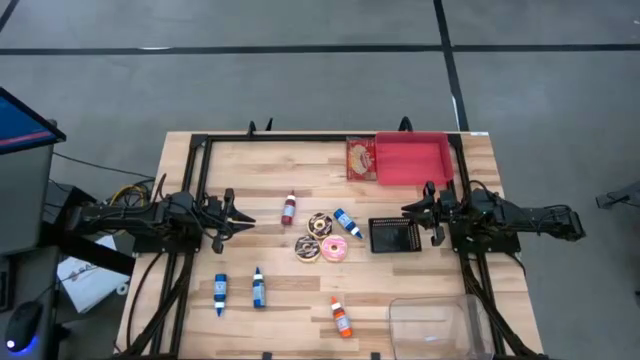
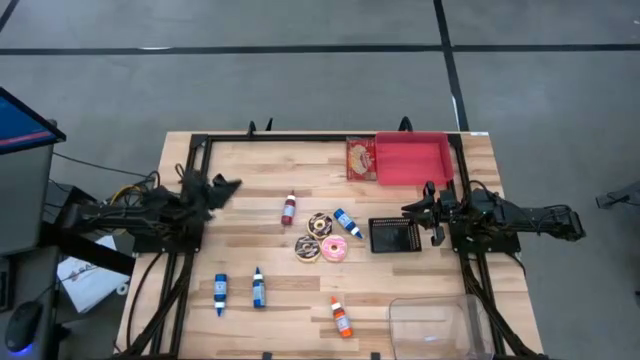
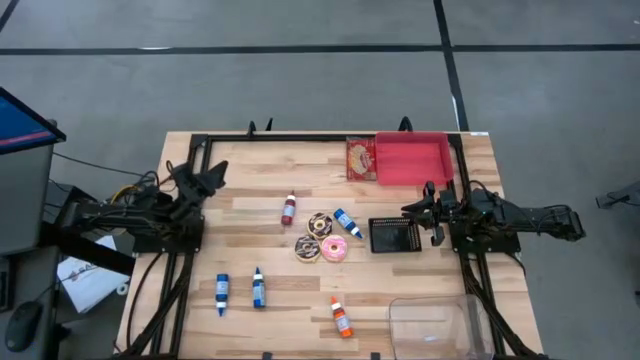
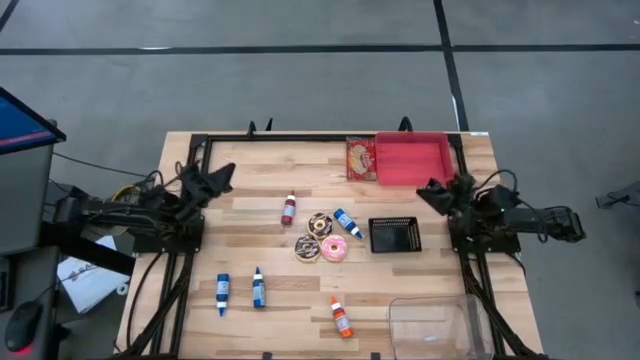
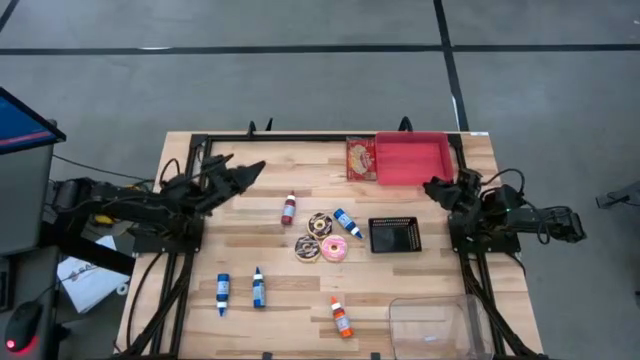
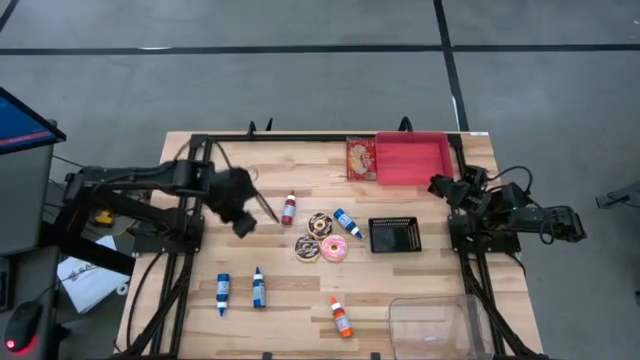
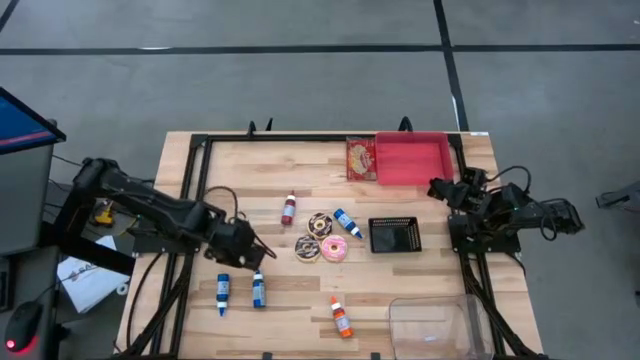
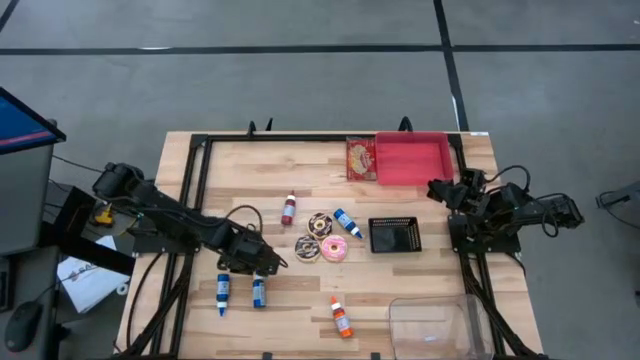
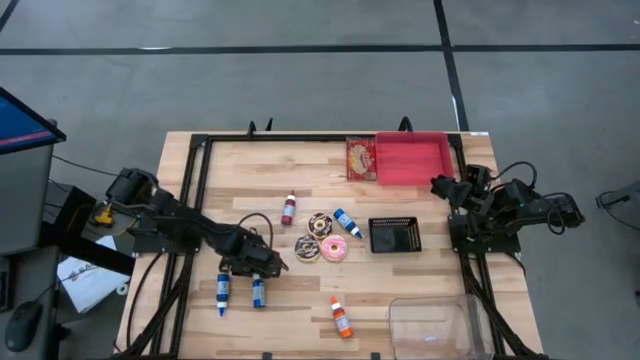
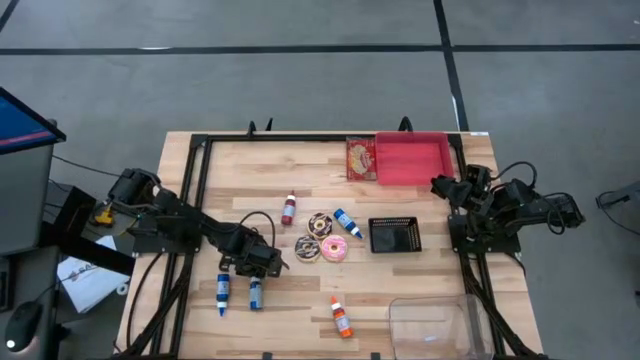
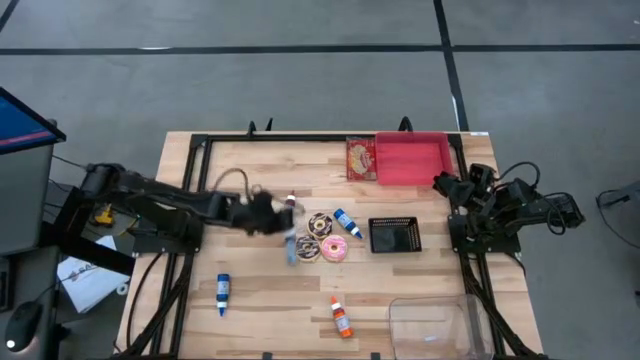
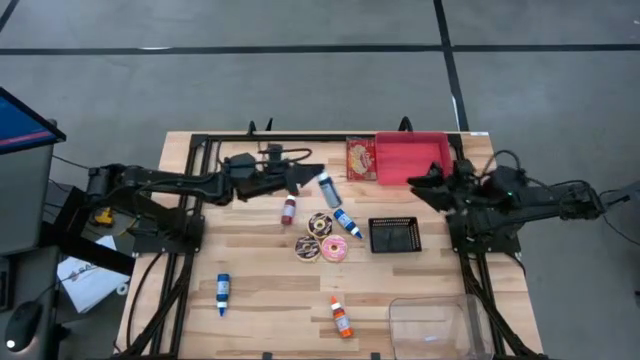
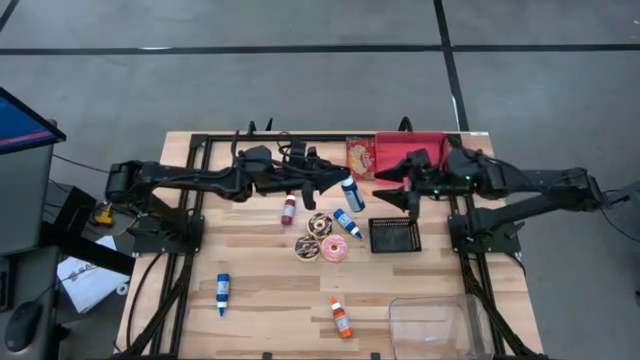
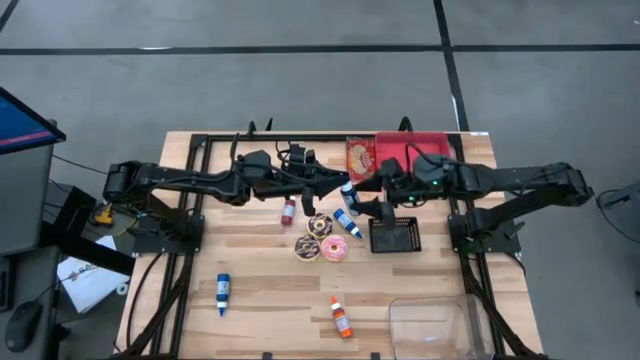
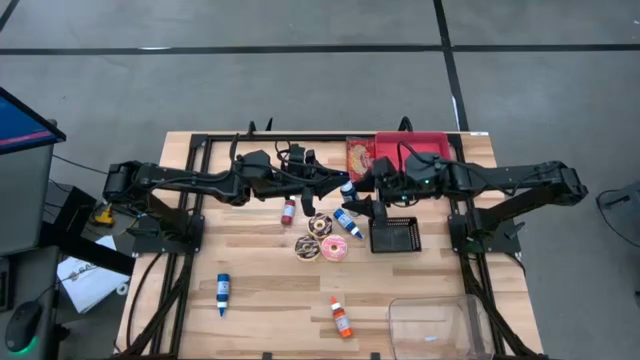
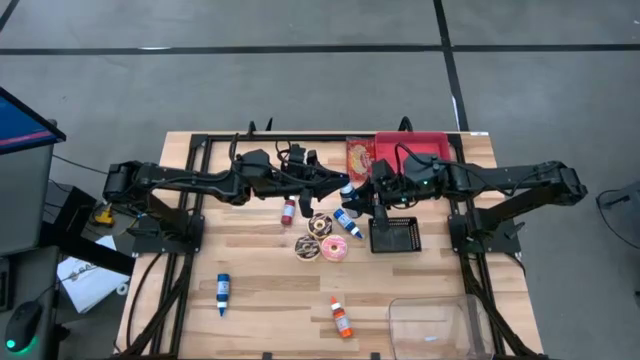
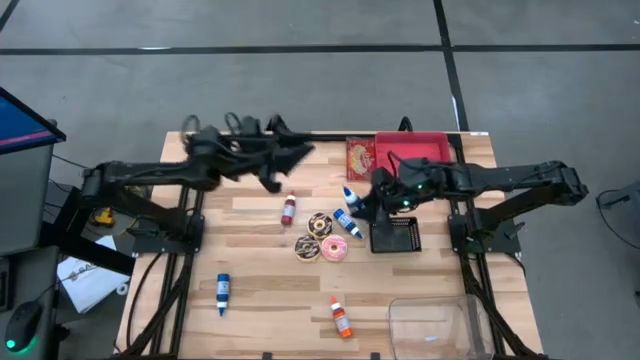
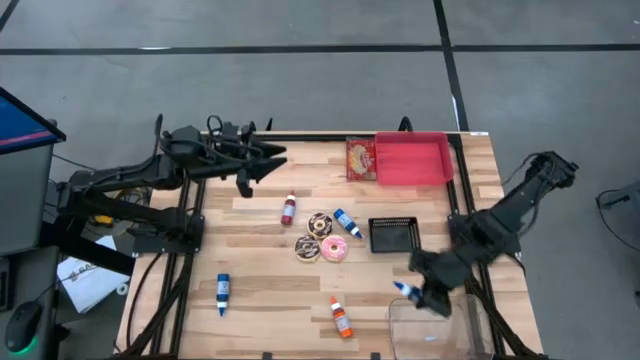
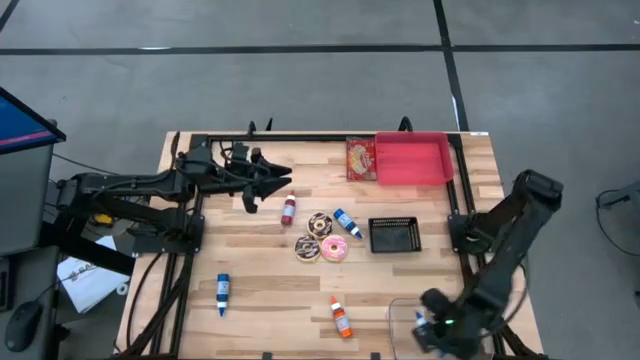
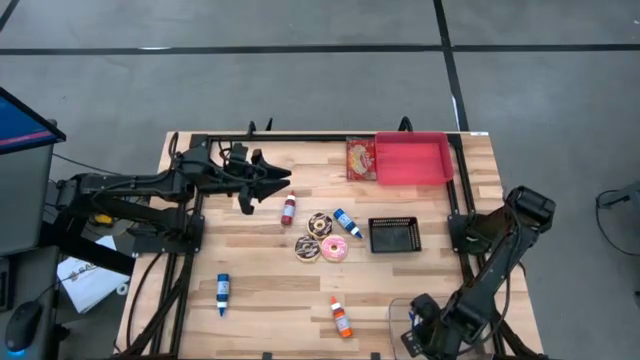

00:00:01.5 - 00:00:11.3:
Put the bottom right blue food coloring bottle into the transparent bin

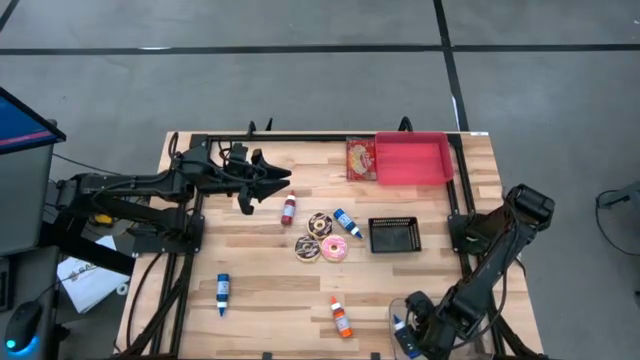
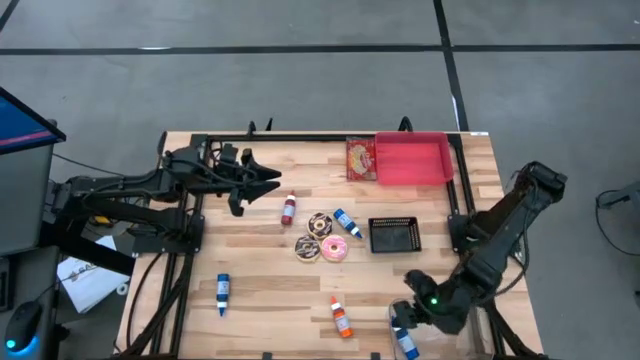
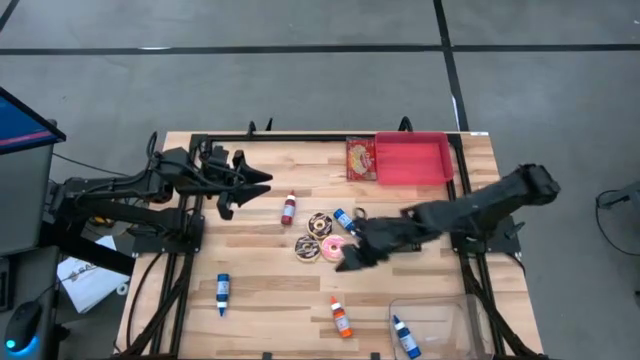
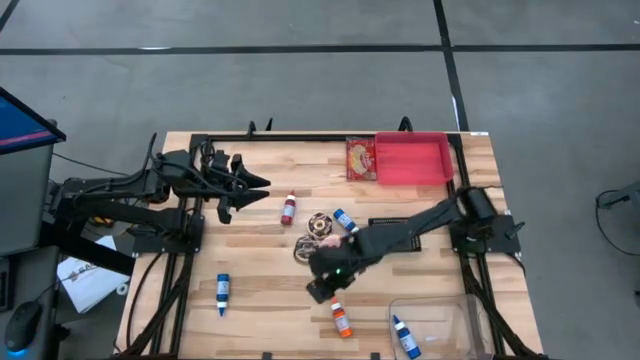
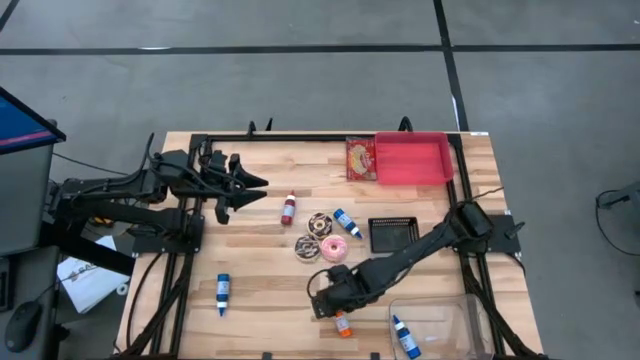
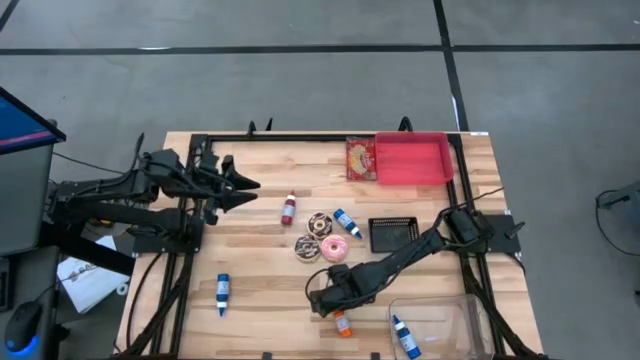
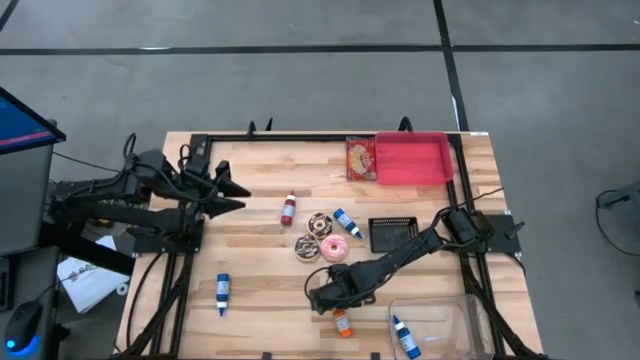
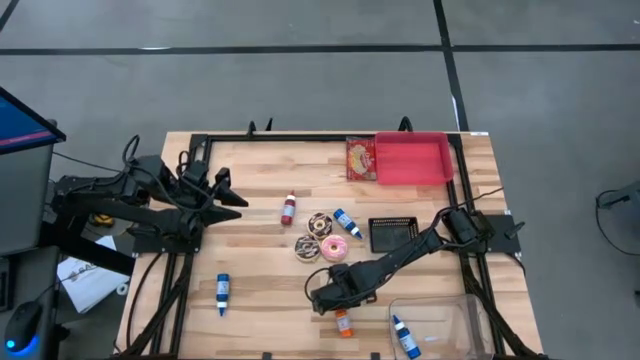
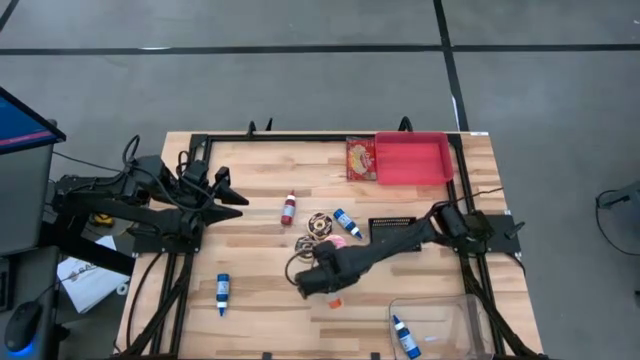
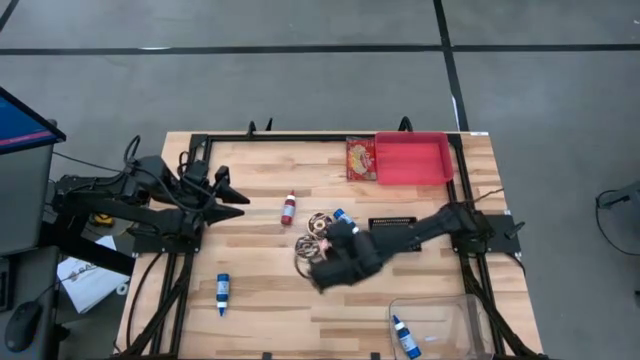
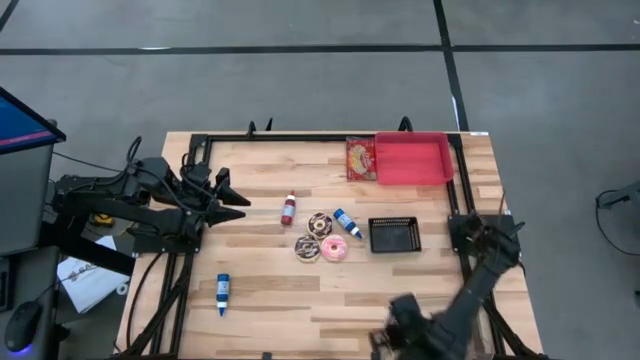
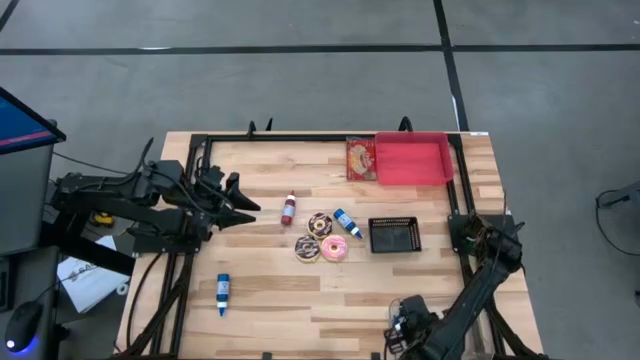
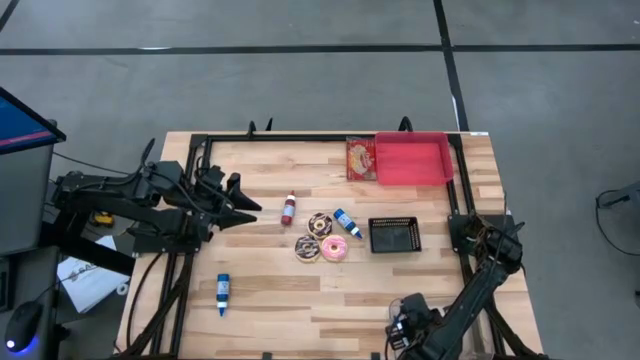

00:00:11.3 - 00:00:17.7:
Put the orange food coloring bottle into the transparent bin
